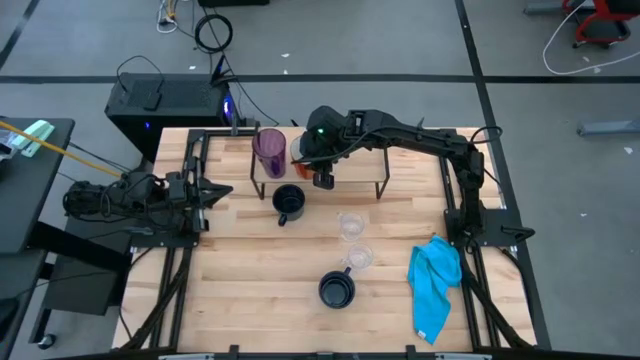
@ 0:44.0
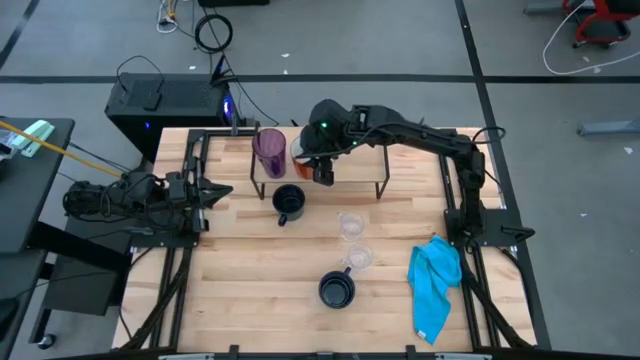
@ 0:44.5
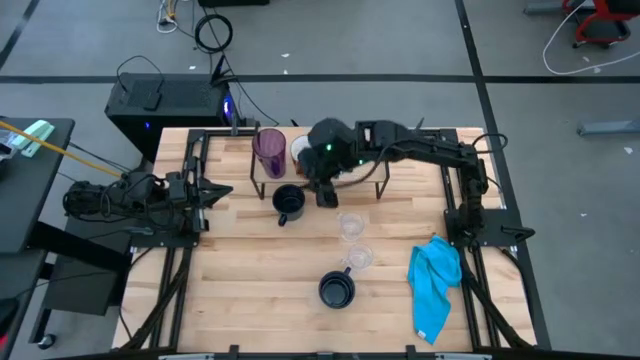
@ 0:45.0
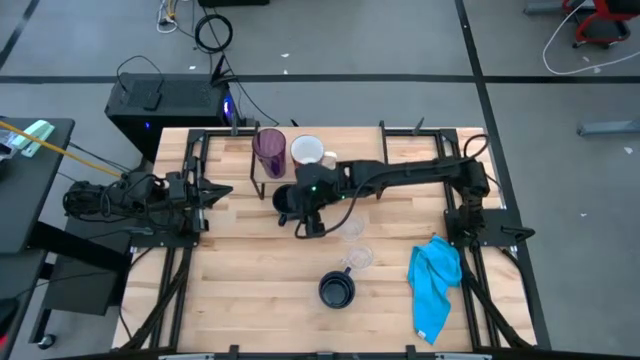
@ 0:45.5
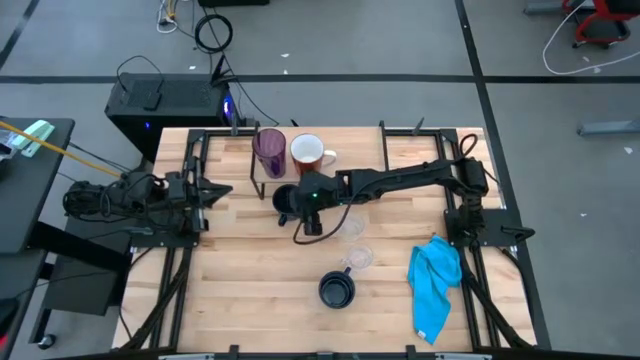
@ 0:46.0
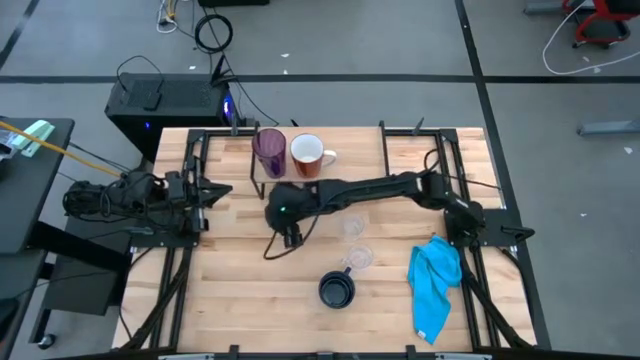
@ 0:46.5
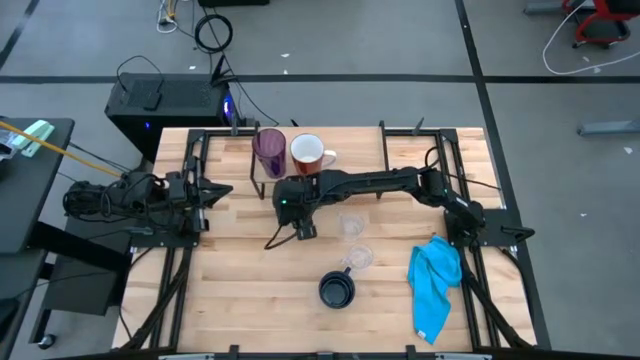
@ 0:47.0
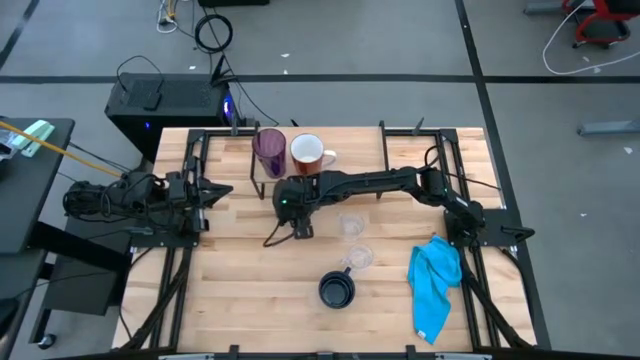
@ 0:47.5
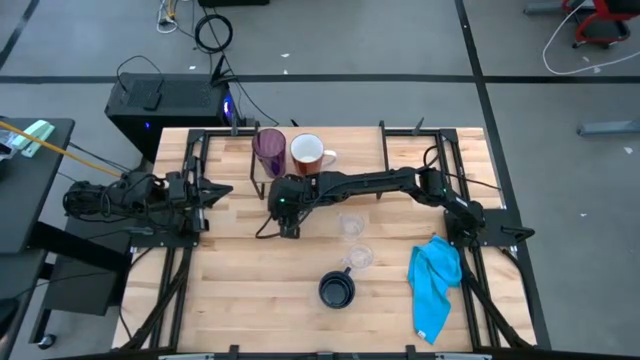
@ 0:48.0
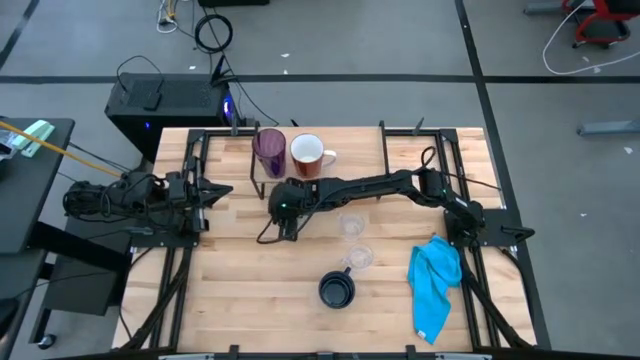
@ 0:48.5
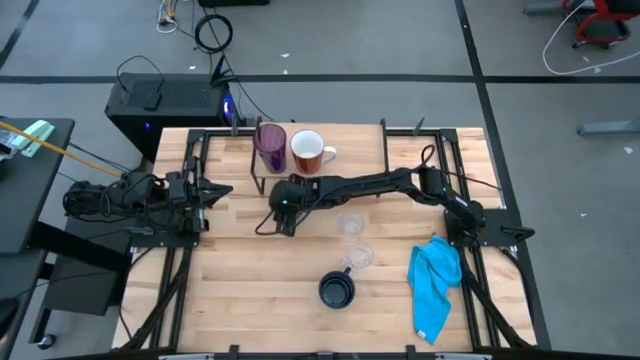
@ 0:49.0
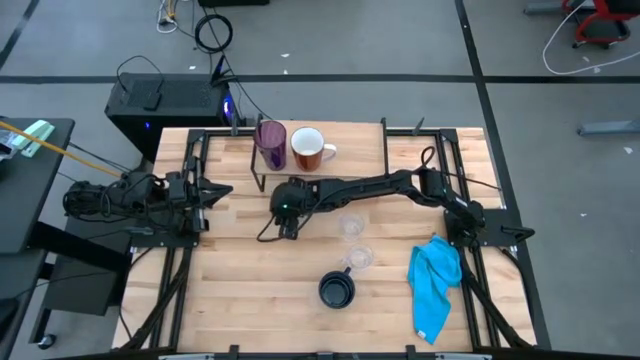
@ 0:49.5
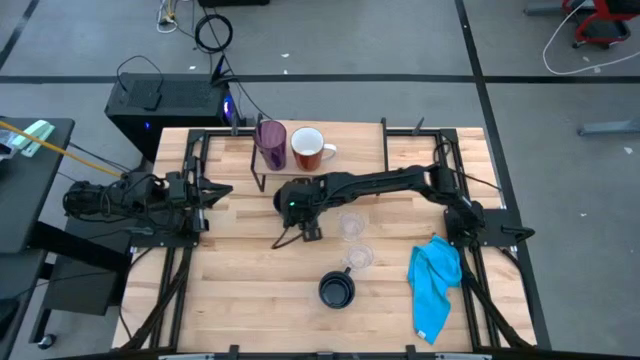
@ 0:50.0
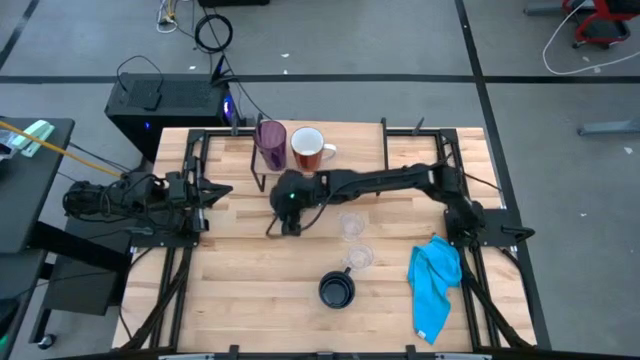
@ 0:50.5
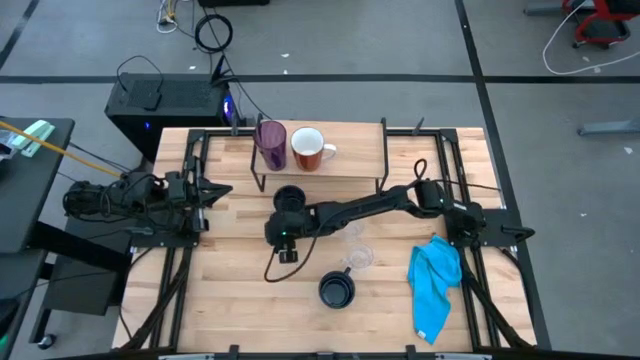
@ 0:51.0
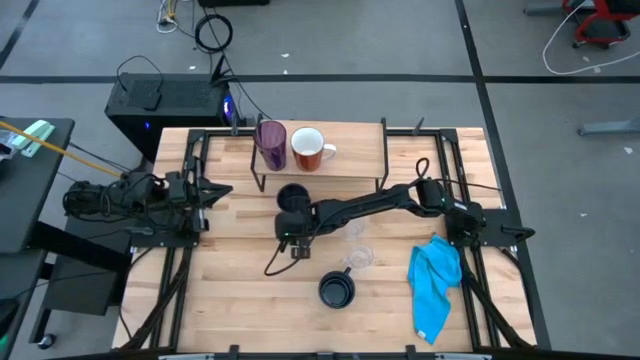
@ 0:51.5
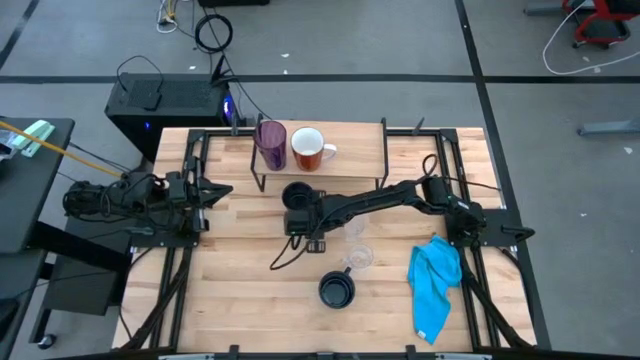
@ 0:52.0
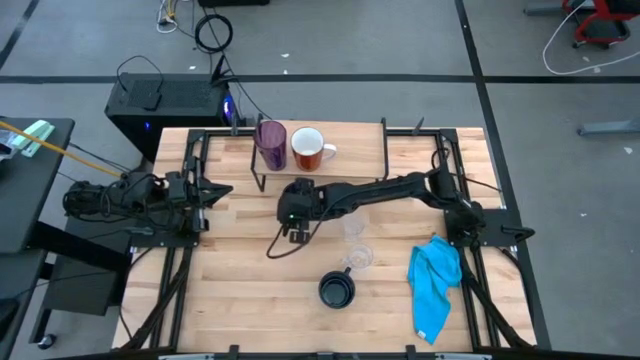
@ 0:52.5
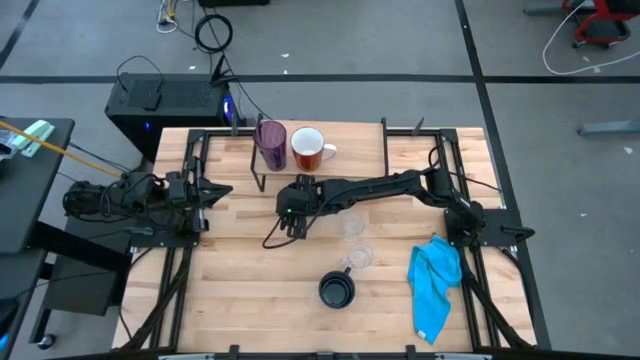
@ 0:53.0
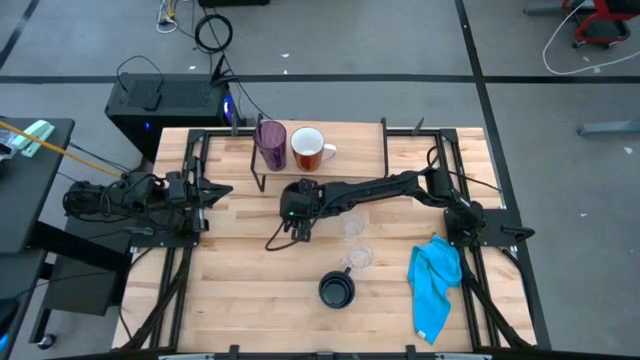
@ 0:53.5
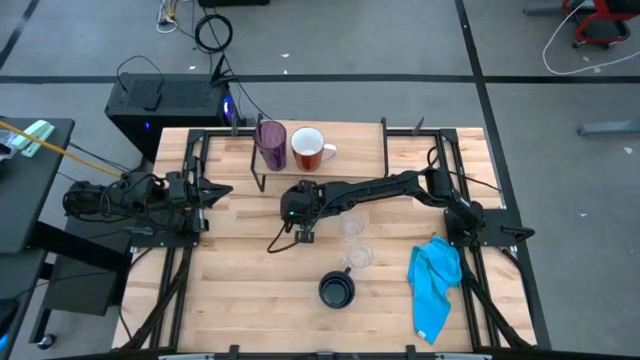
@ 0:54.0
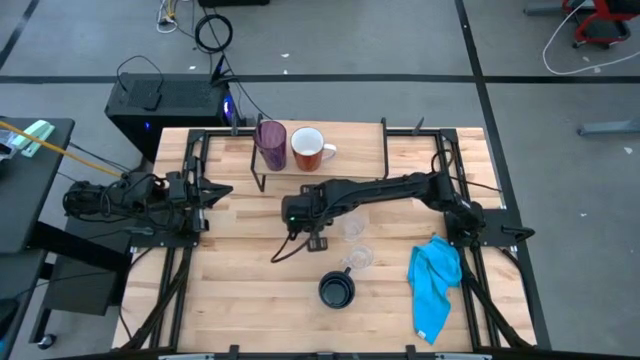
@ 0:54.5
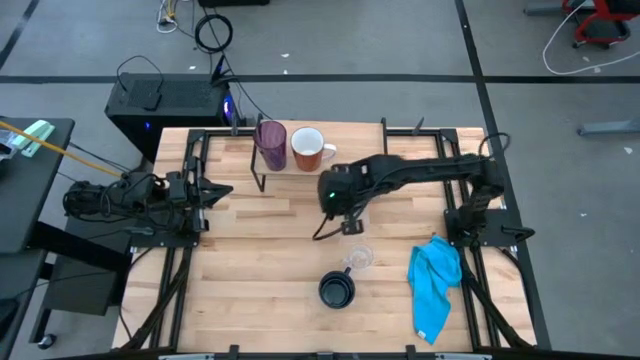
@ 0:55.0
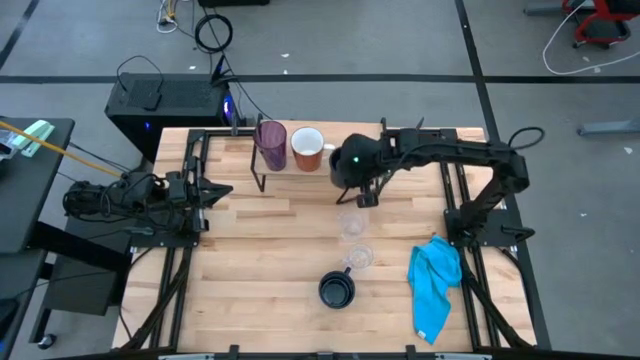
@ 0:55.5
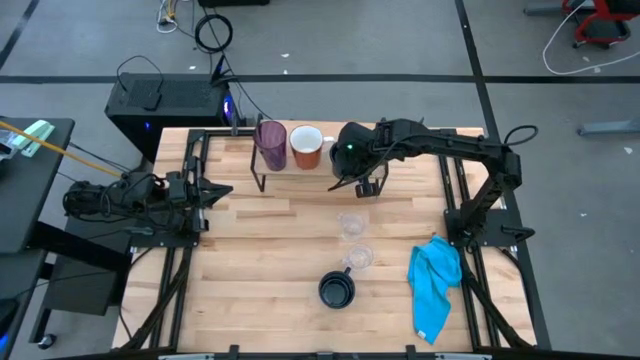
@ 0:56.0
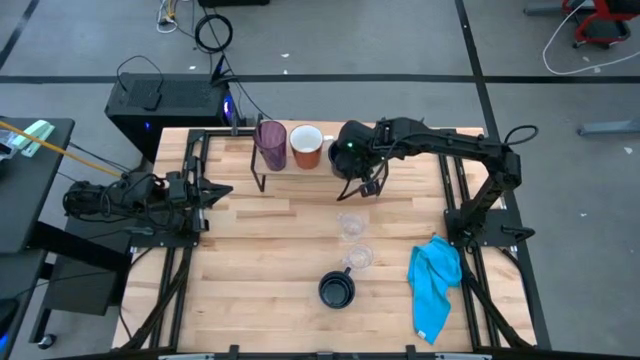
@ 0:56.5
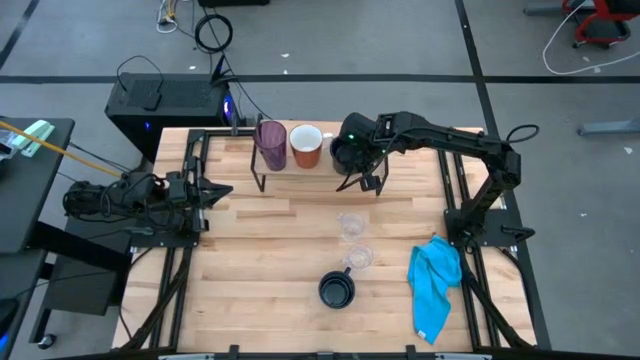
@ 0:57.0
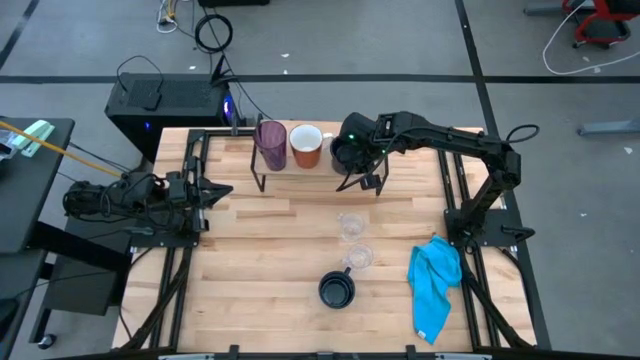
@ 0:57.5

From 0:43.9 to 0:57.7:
Task: Stack small to large cups/mugs on shelf
Put the dark blue mug on the shelf

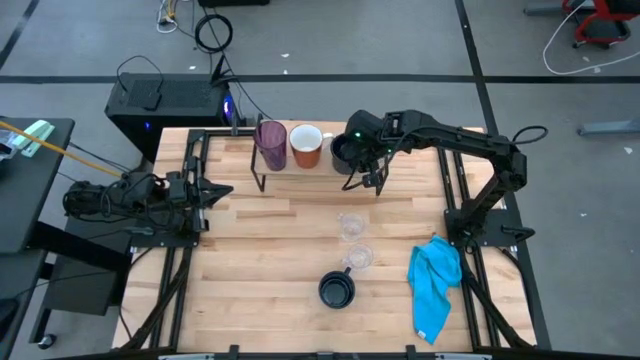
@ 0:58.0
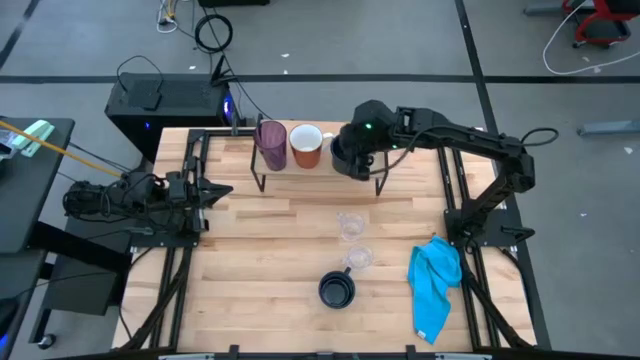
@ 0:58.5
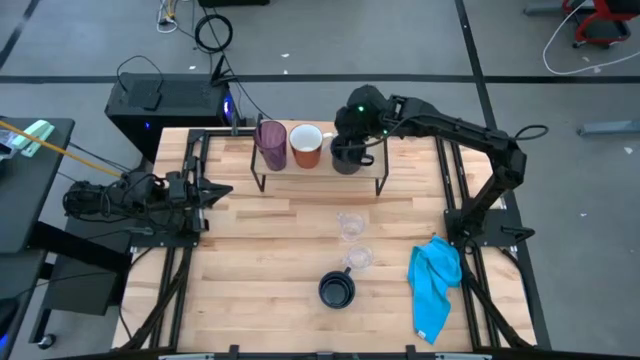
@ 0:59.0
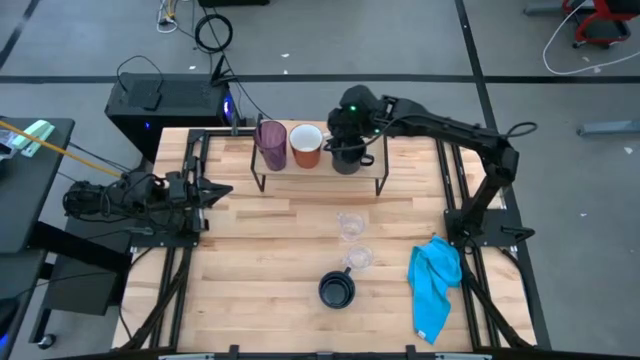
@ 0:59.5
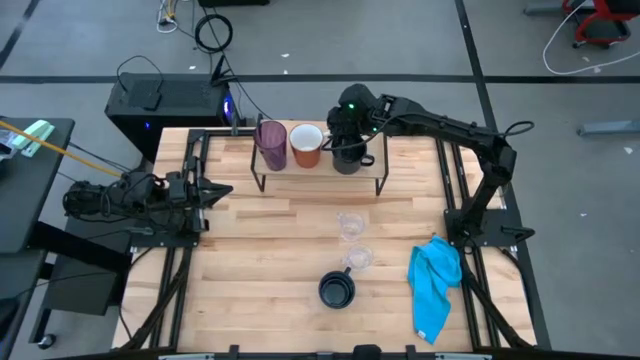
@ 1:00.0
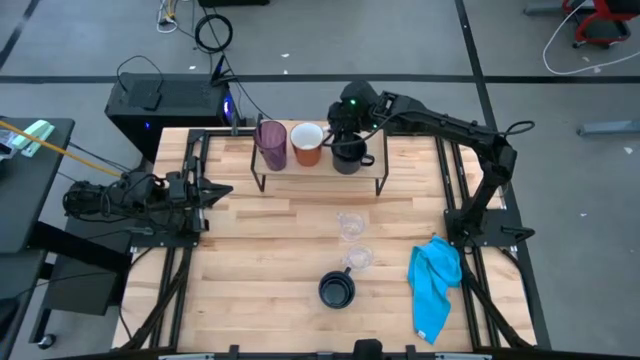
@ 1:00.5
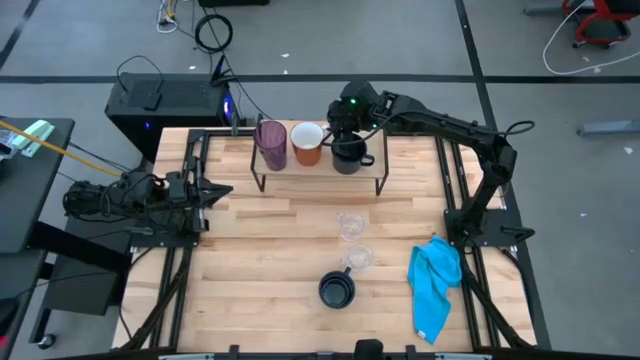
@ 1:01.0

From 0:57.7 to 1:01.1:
Adjust the orange mug on the shelf

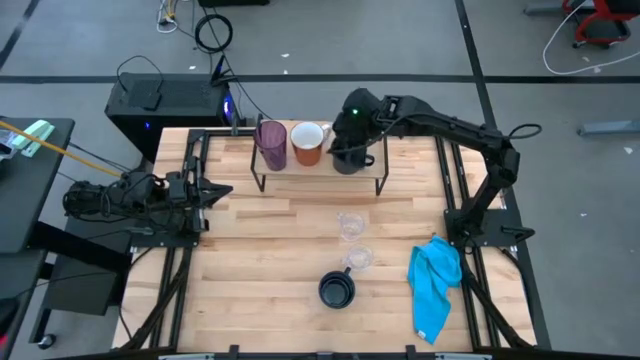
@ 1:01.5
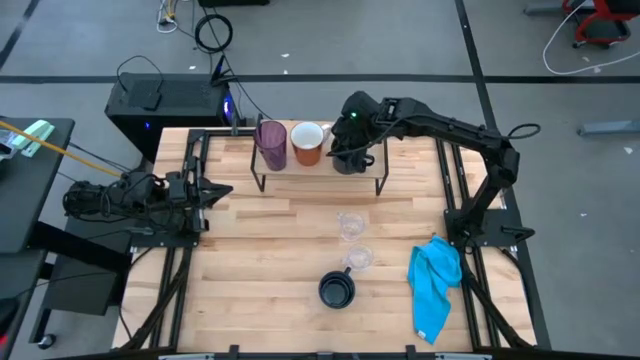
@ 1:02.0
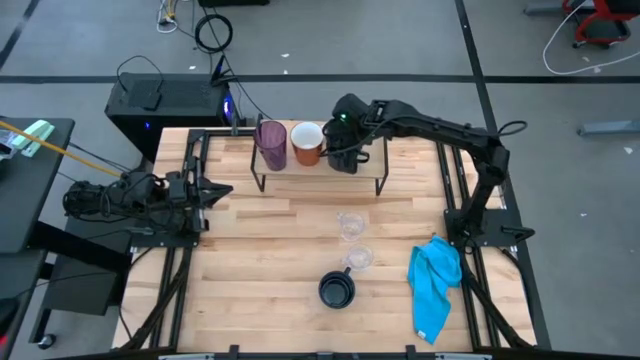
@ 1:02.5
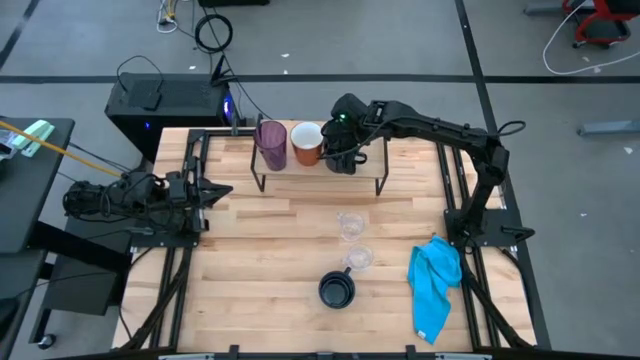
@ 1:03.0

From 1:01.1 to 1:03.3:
Adjust the dark blue mug on the shelf
